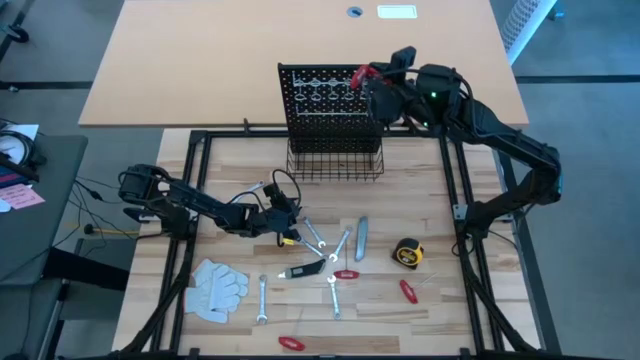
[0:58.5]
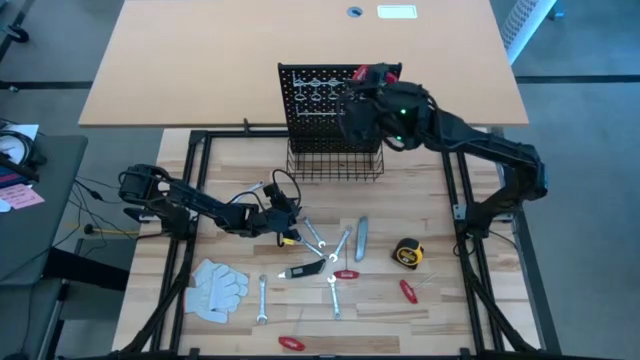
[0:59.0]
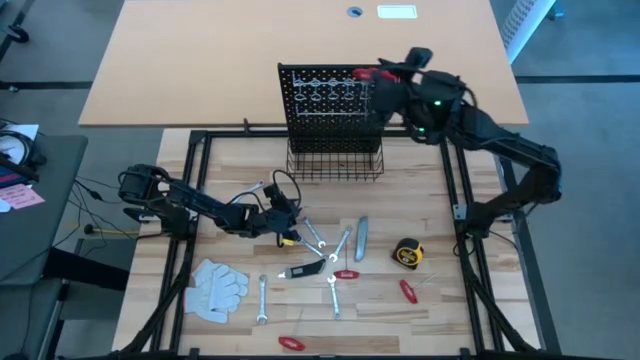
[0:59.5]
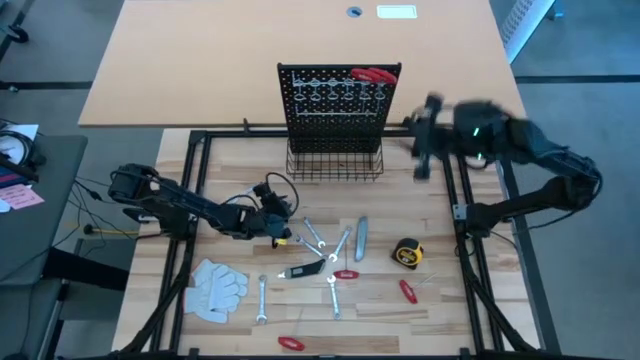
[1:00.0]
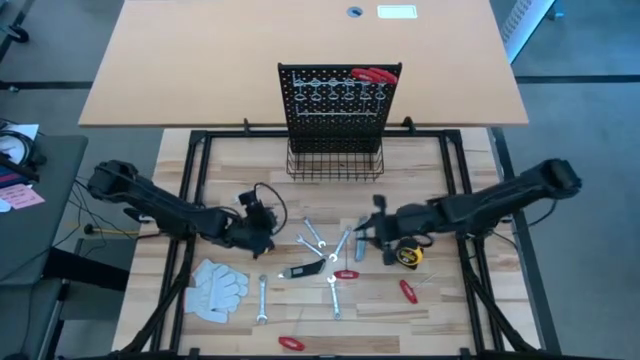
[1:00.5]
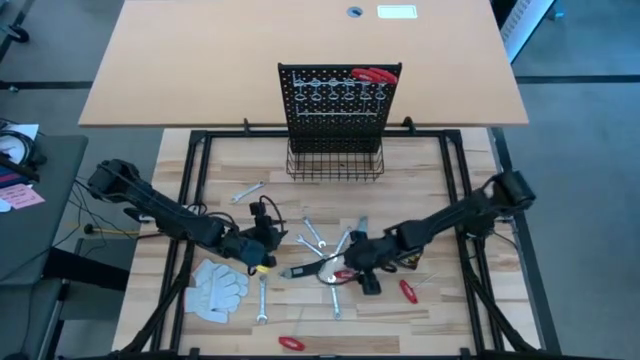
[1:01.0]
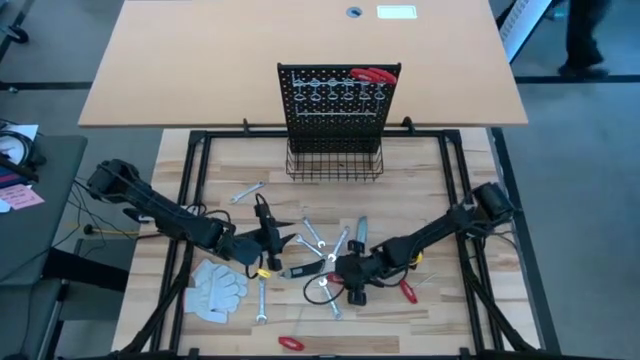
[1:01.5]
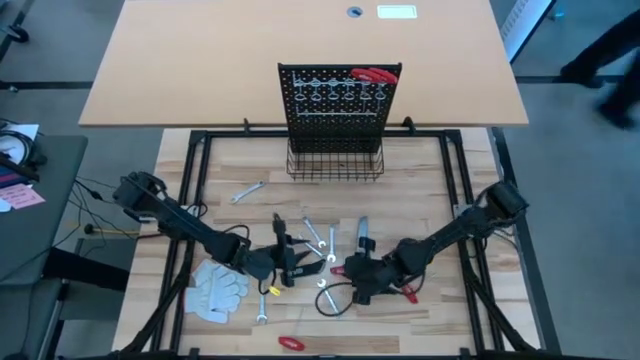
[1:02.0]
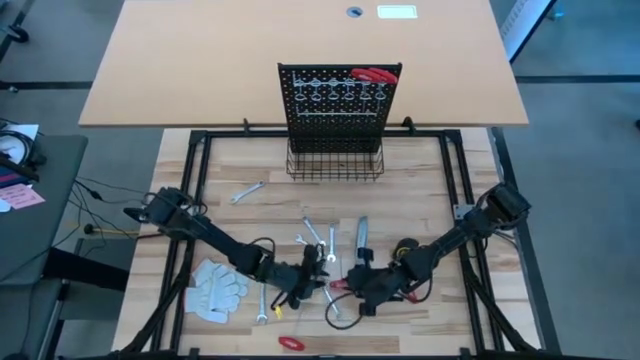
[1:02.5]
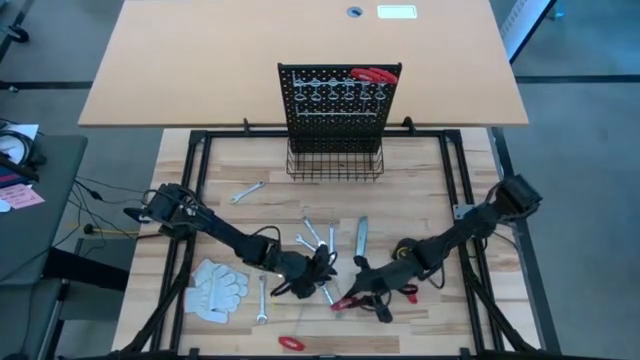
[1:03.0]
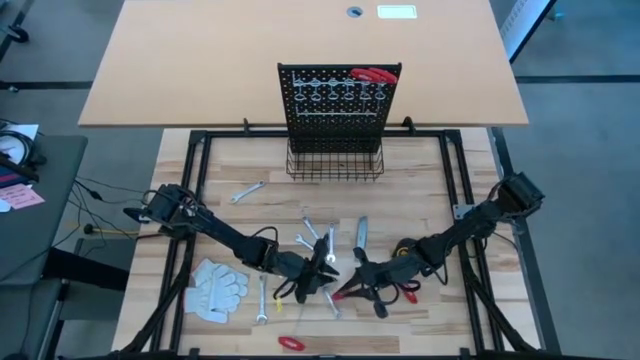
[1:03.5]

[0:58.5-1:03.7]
Task: Hang tools onto peg board
Hang the red allen wrench on the pegboard

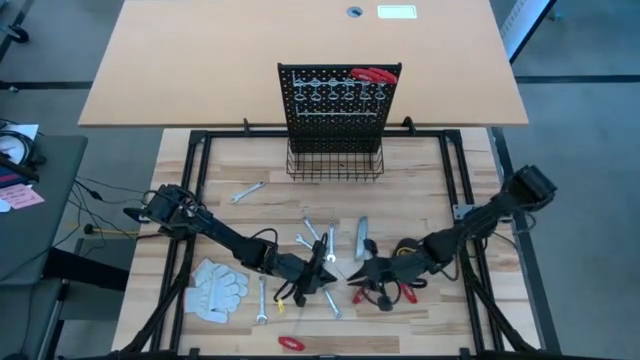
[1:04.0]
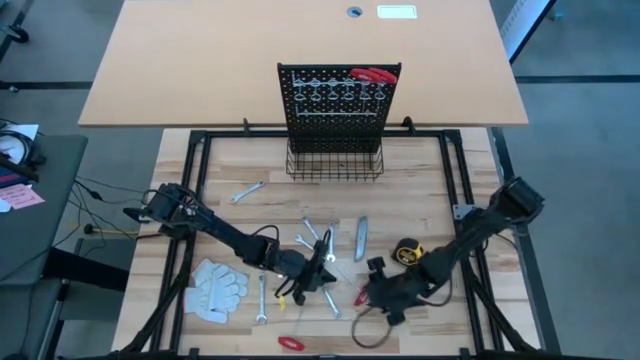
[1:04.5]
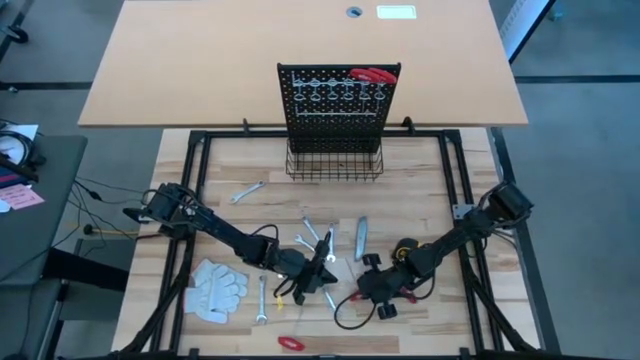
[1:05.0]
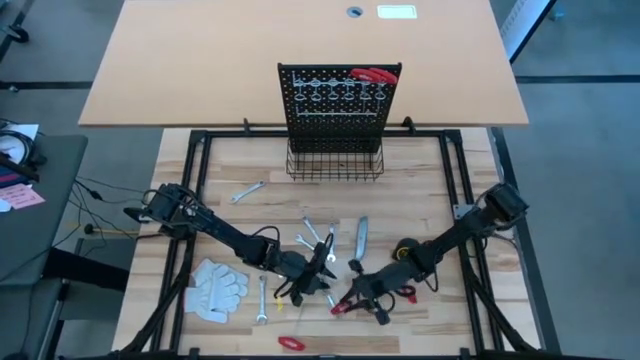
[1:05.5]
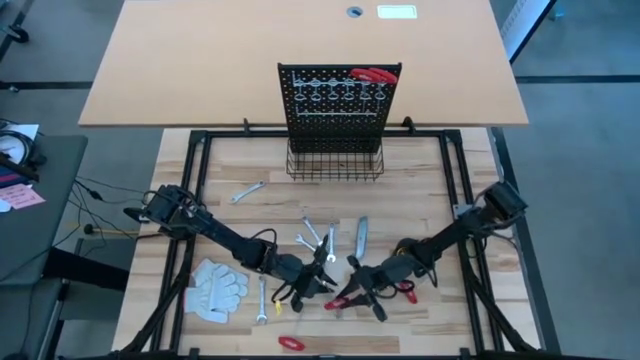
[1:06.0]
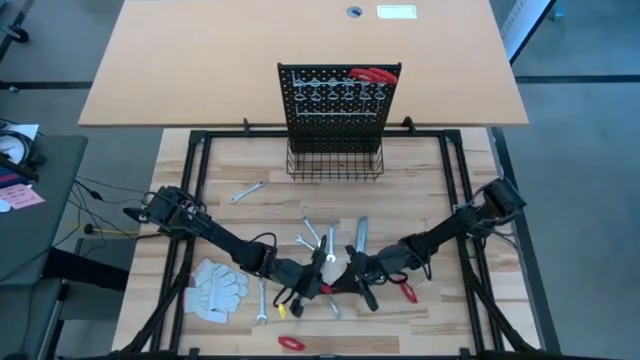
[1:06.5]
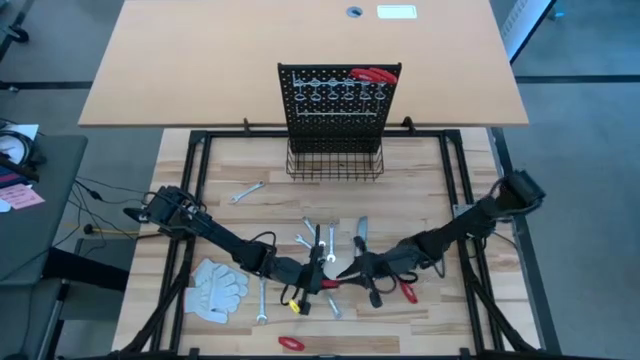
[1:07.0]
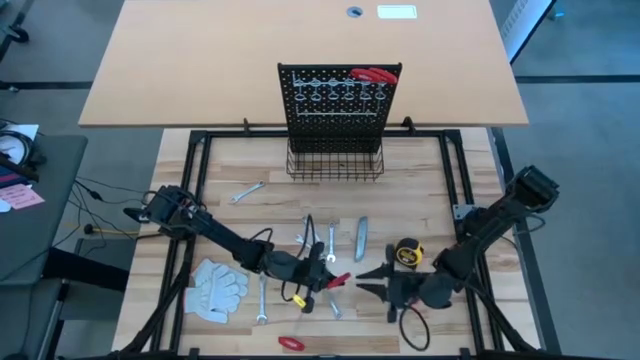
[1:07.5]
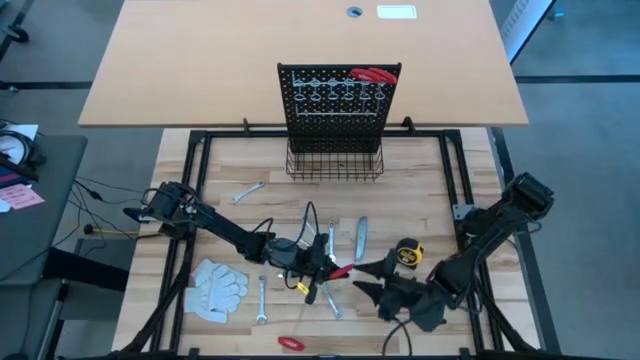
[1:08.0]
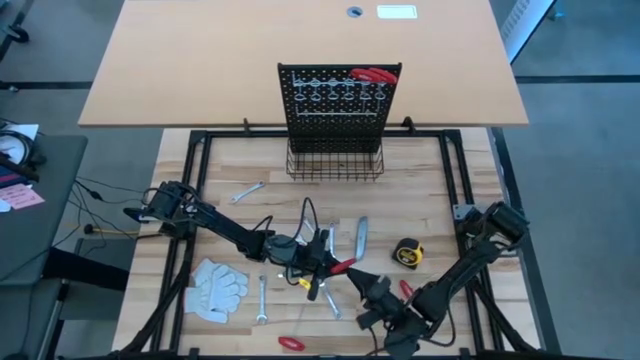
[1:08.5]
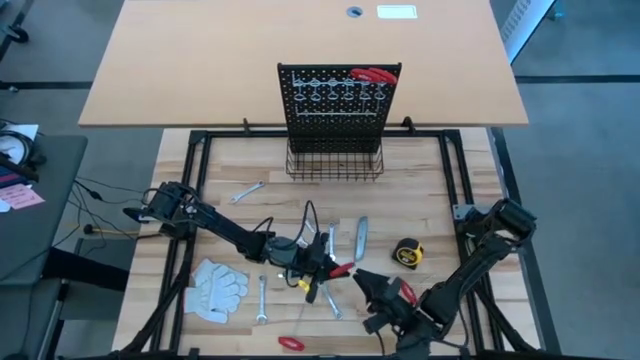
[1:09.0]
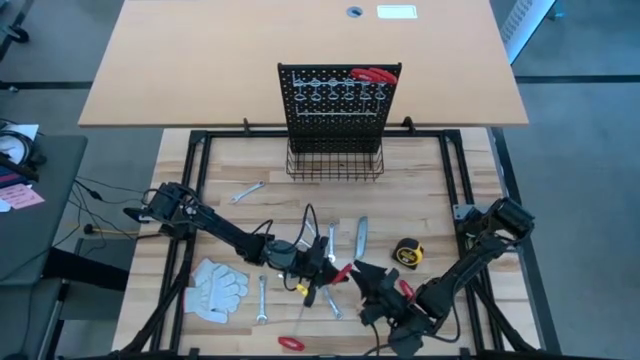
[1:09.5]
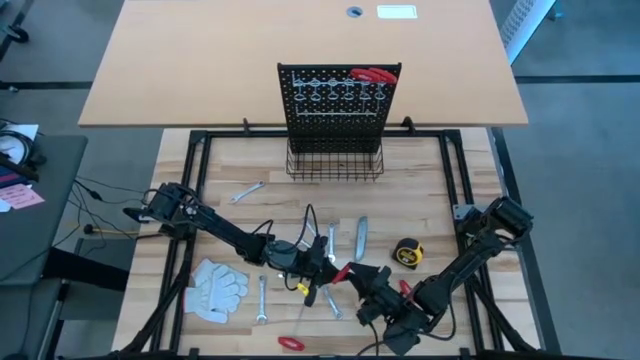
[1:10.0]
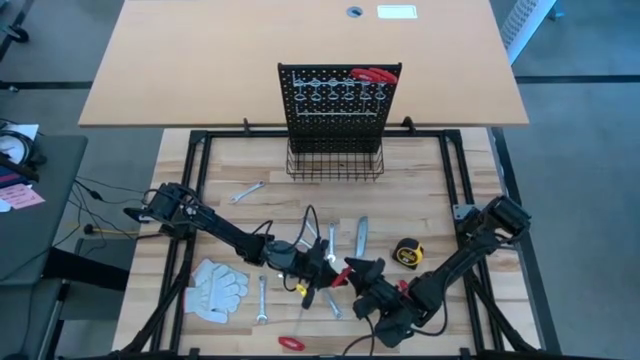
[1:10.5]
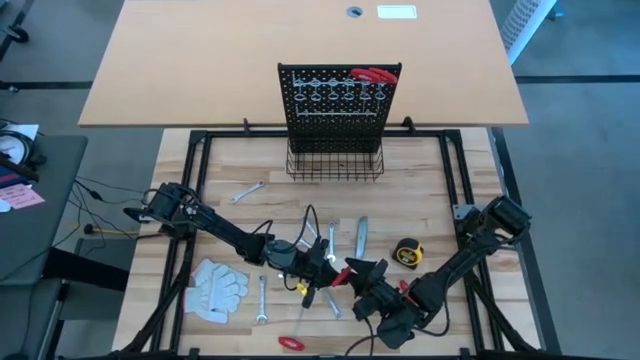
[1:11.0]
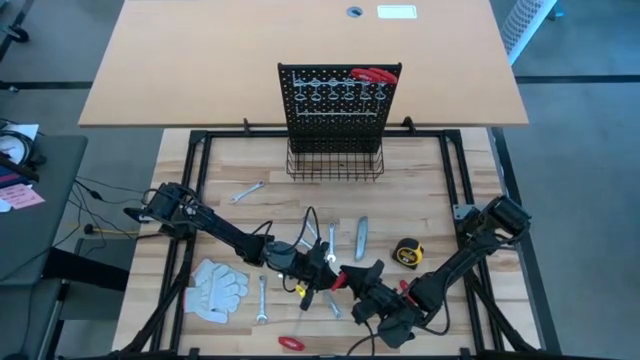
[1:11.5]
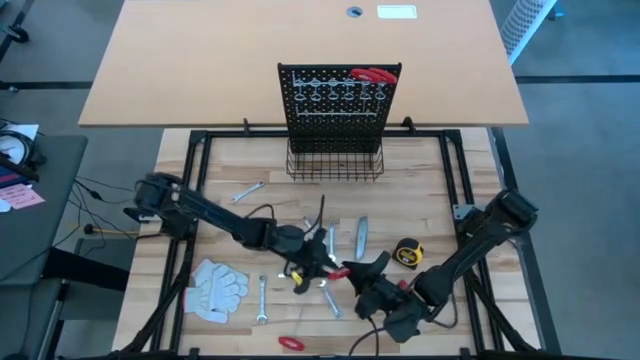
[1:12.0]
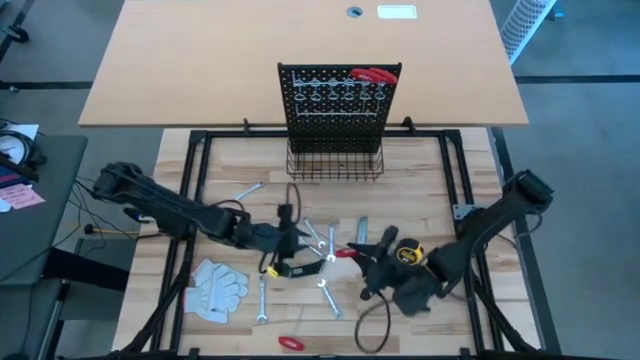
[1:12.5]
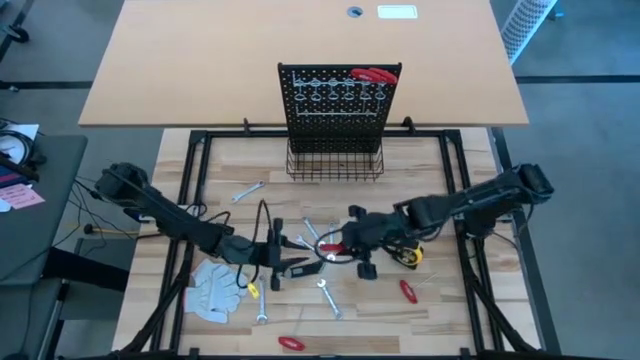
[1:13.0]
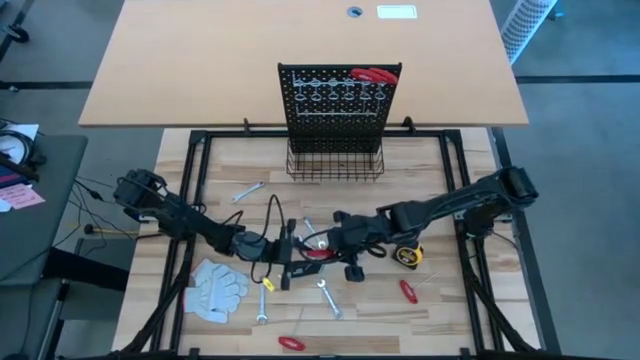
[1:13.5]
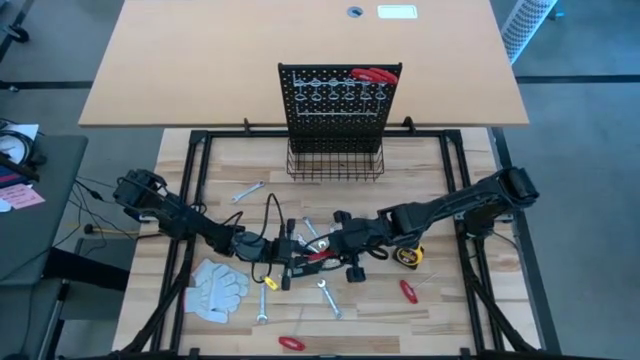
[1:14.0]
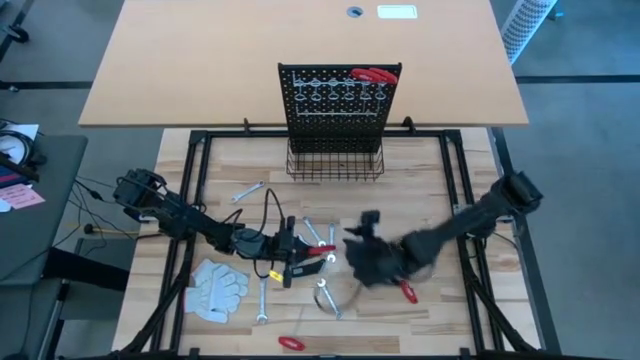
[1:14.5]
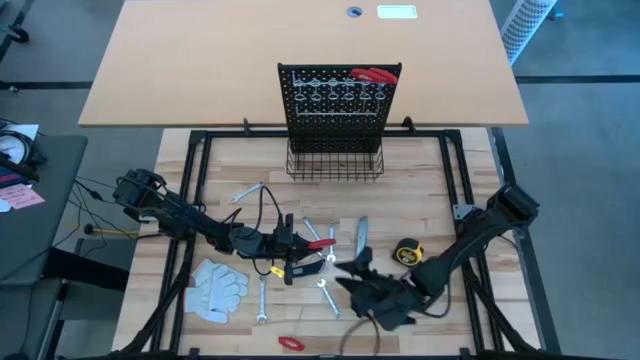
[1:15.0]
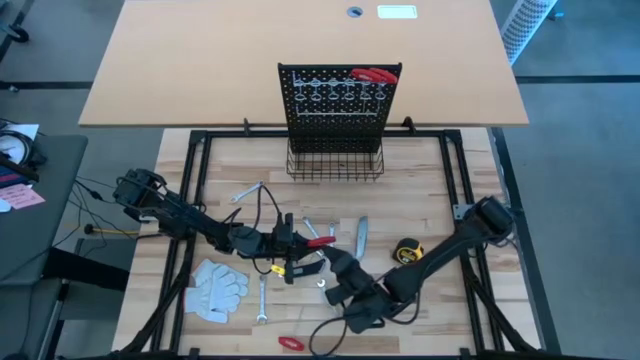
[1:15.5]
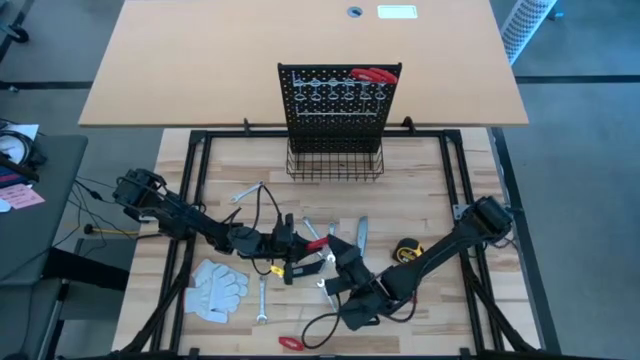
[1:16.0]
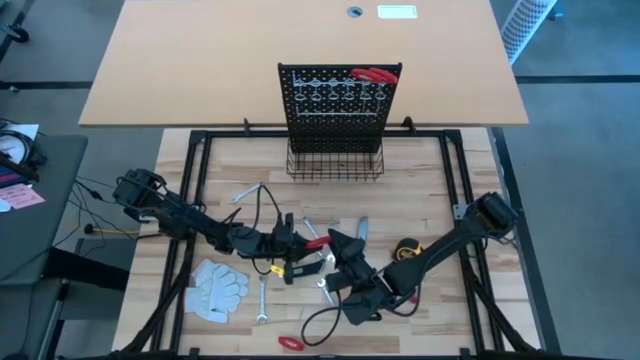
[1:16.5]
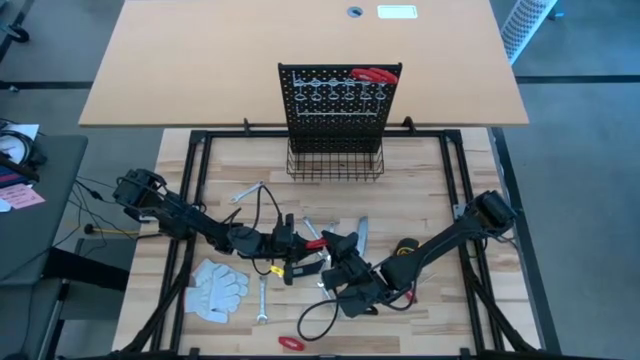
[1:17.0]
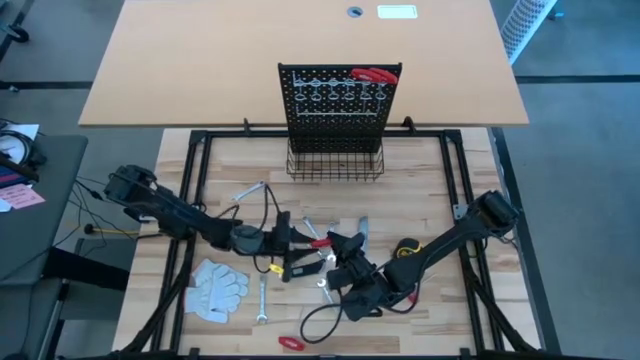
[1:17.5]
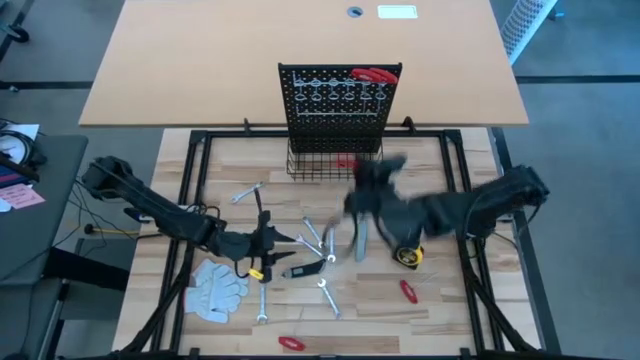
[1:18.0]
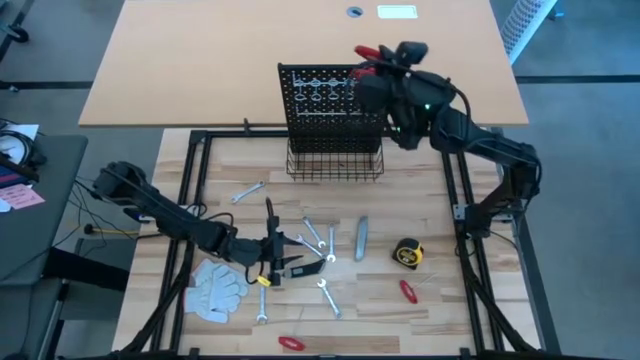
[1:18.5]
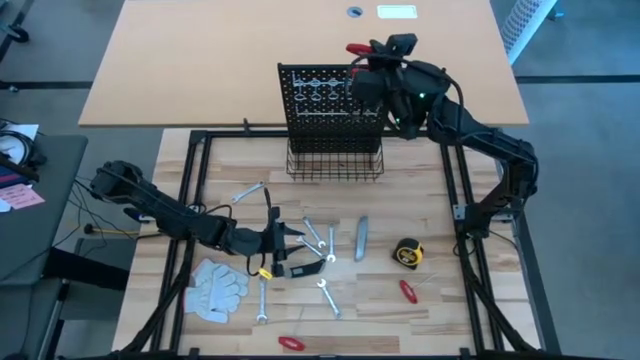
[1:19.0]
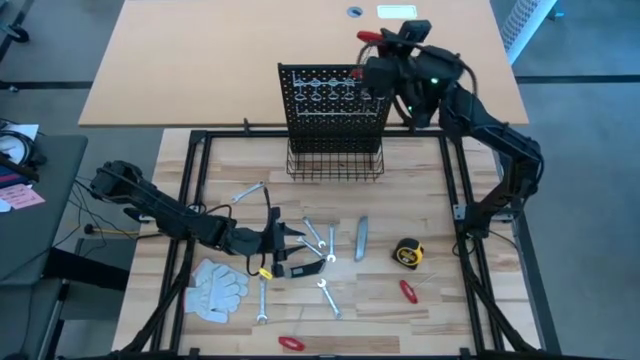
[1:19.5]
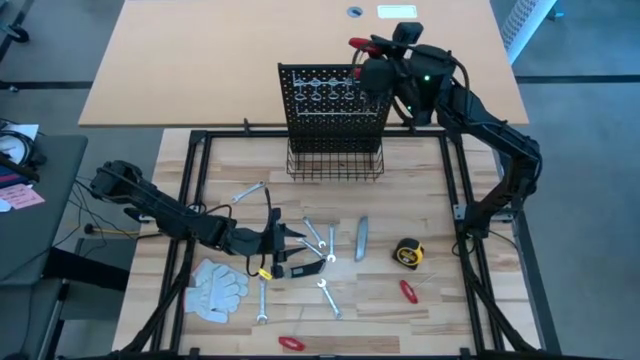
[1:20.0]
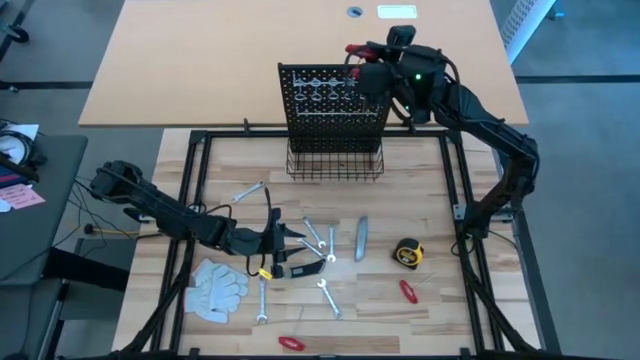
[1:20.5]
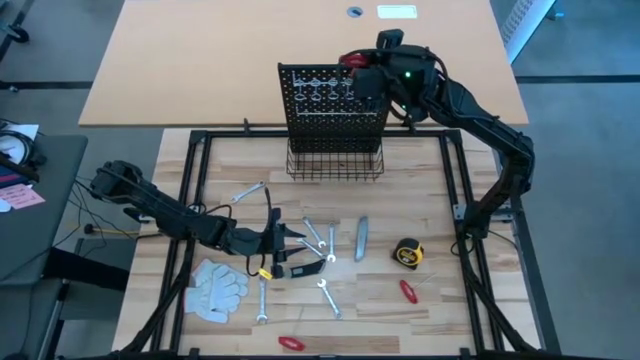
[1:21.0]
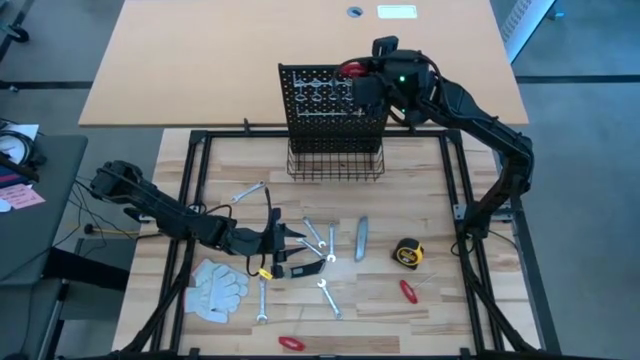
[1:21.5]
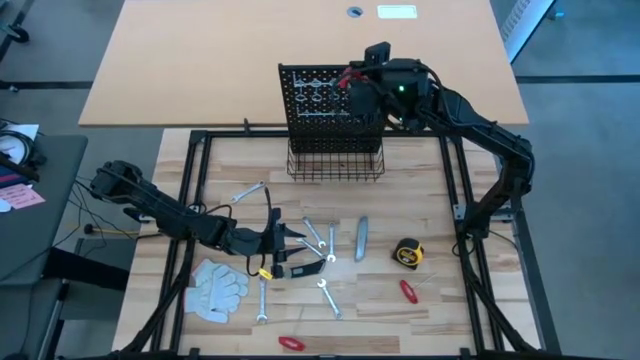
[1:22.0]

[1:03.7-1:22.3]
Hang the red allen wrench on the pegboard
